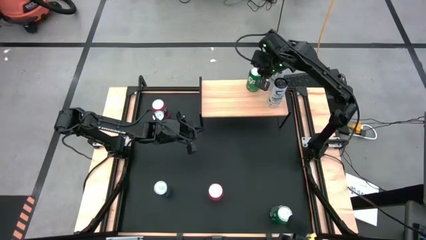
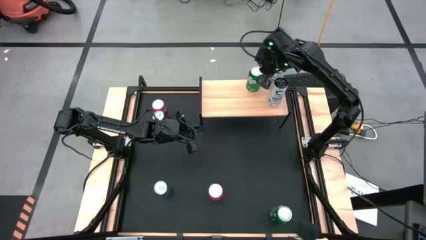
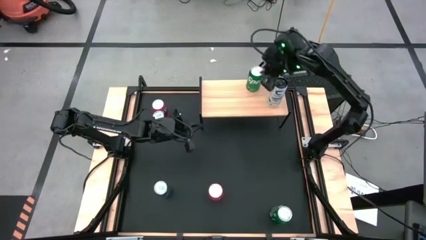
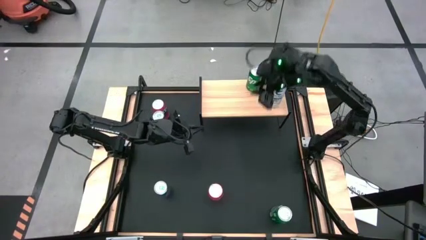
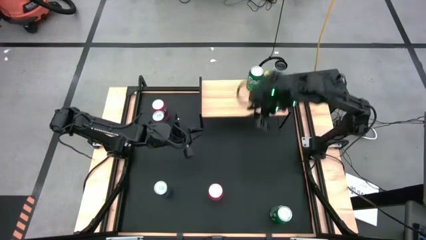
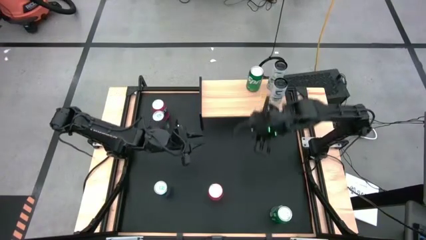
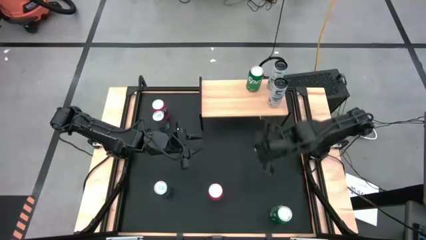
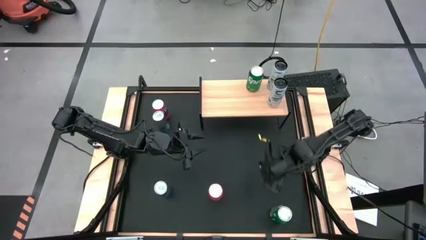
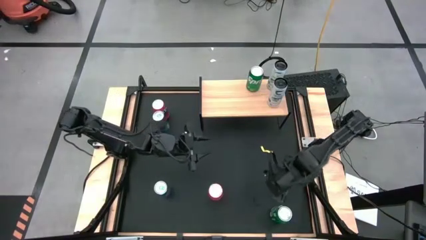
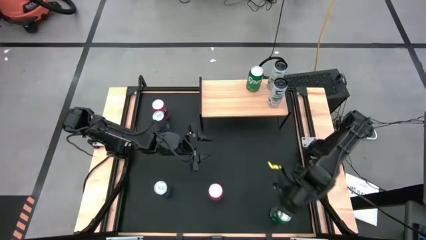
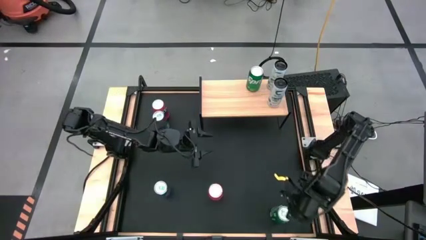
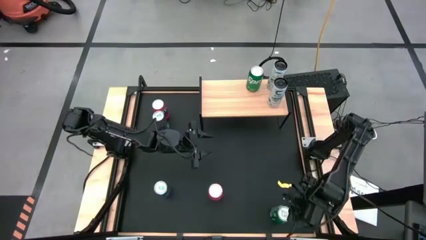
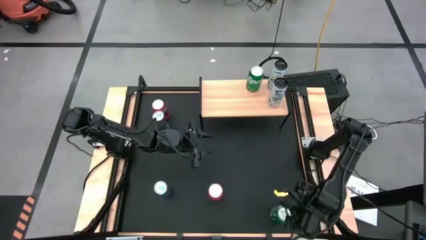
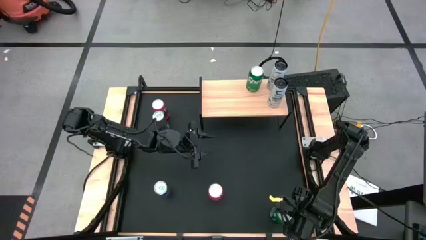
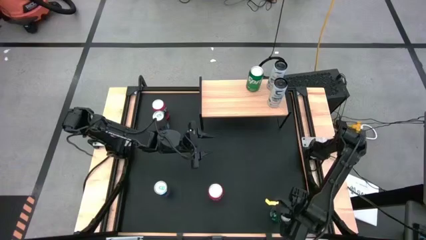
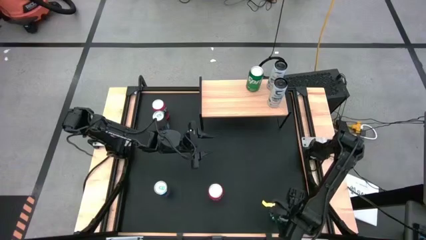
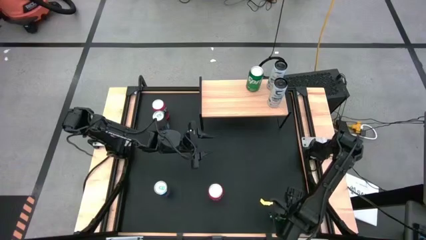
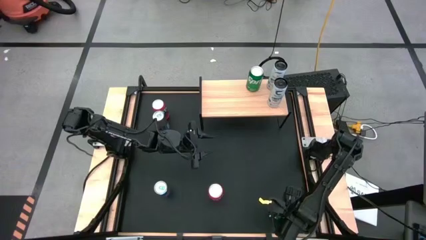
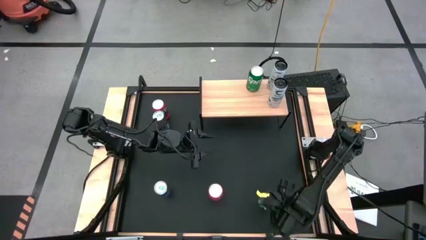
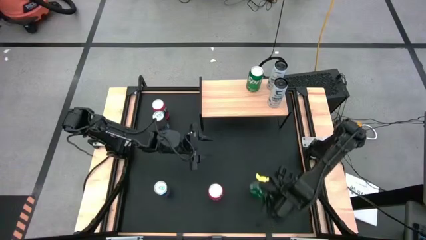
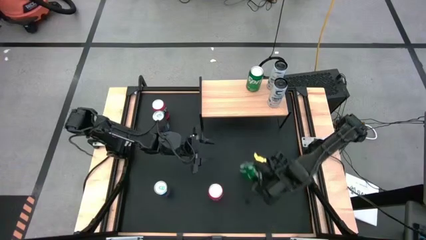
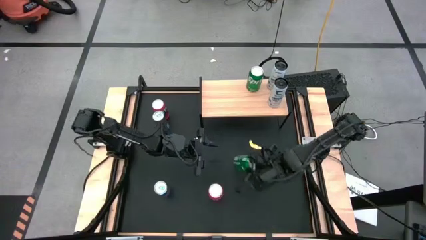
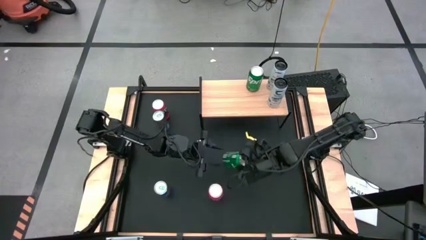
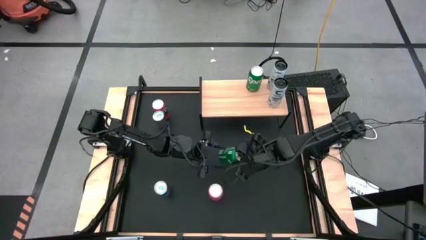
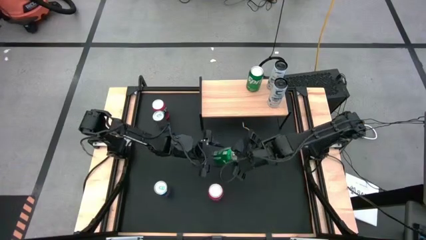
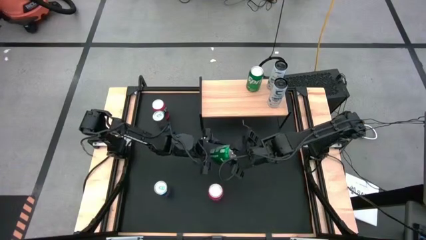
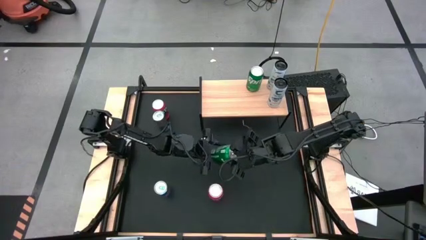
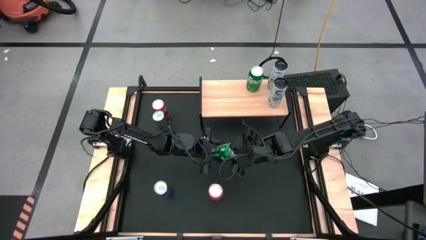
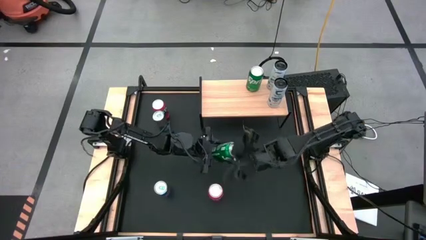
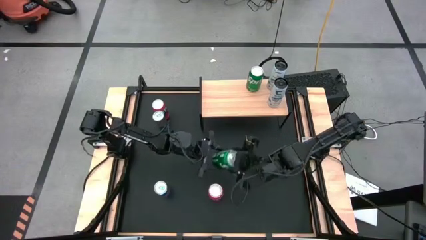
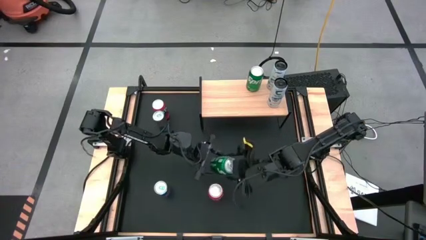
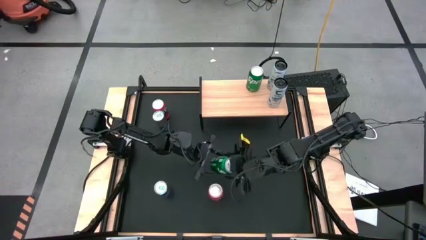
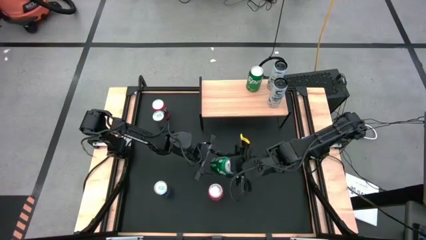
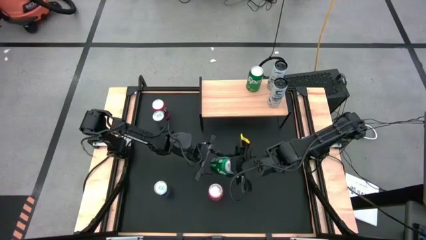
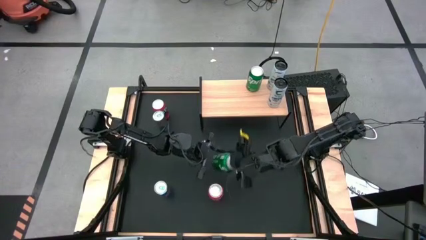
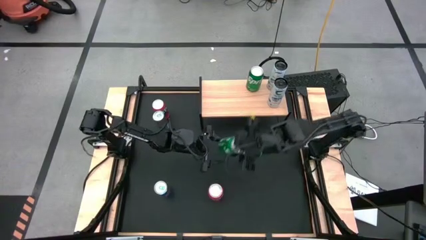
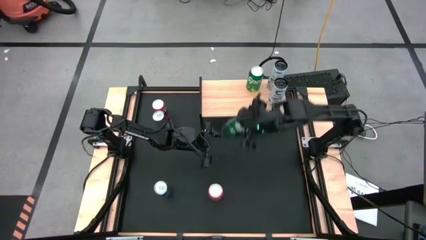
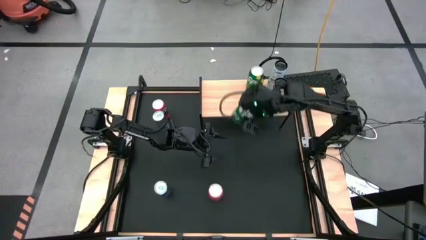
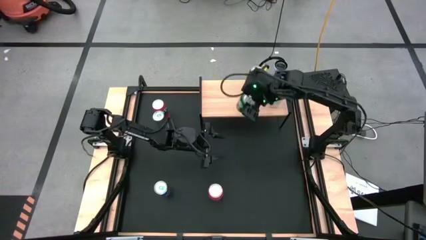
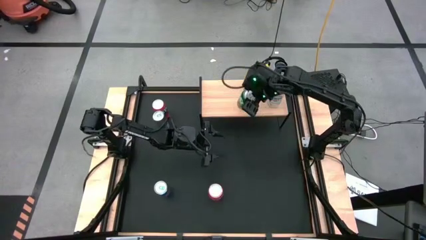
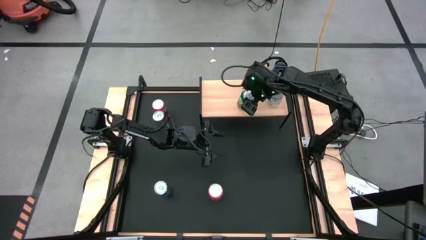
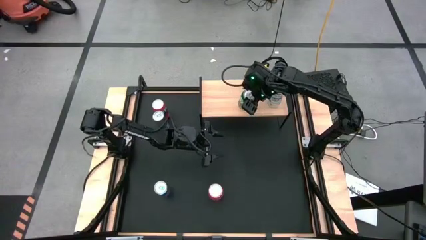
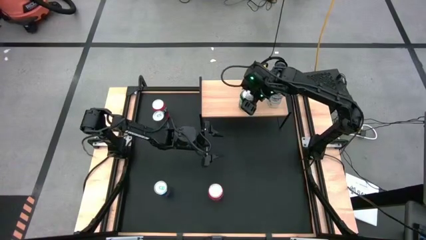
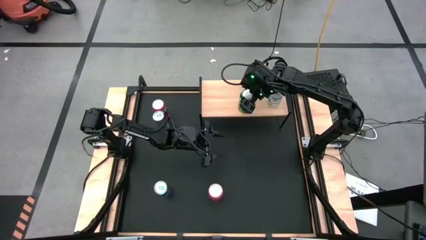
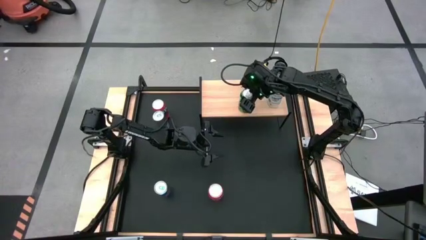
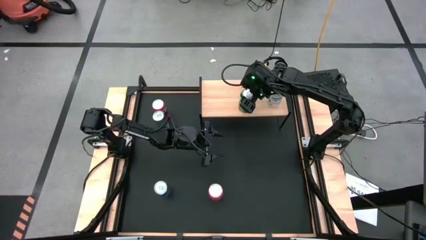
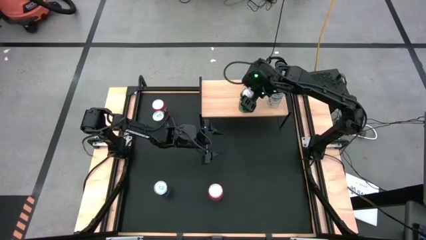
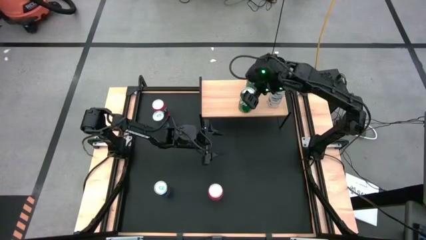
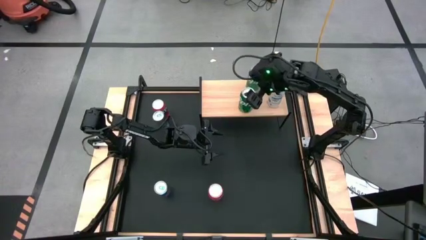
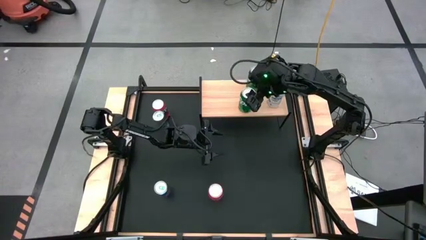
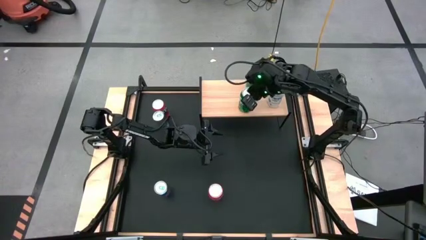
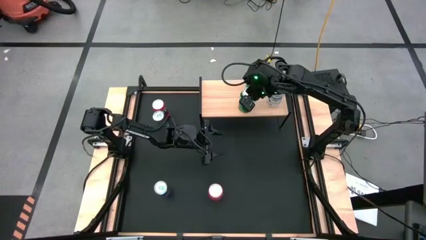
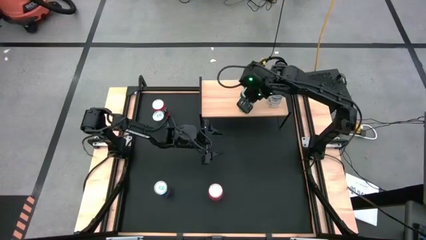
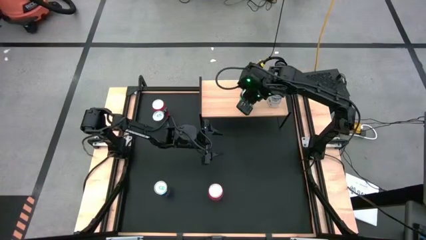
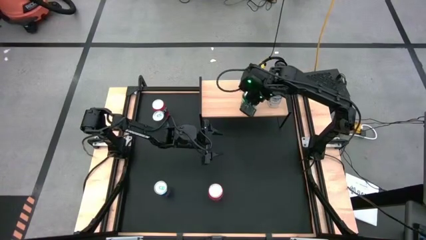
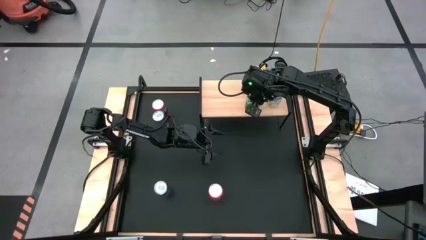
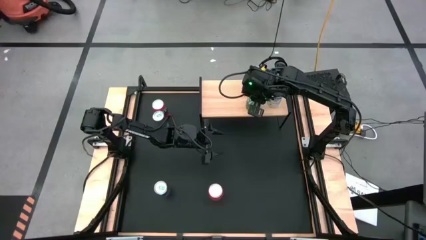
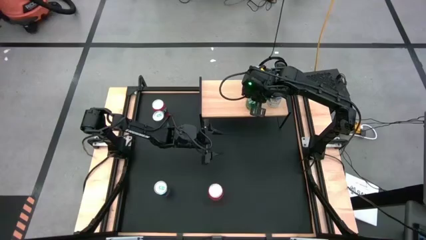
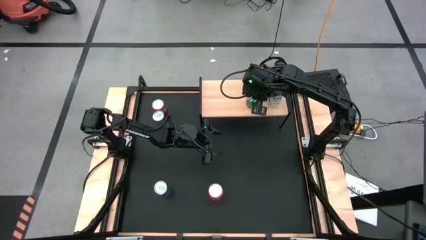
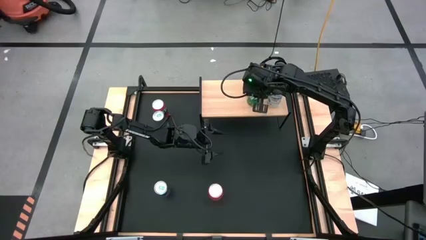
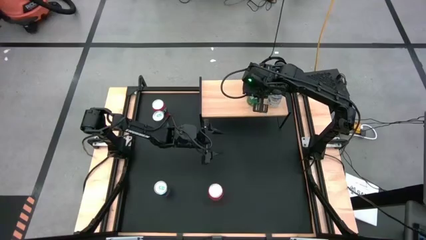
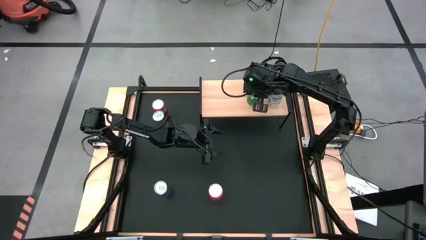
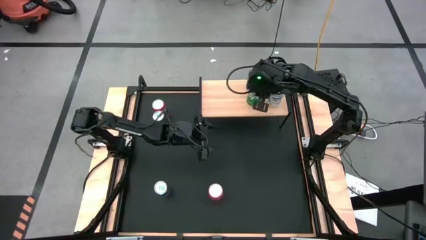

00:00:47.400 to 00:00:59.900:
Task: Place canned beverage on shelf
Put the green soda can on the shelf

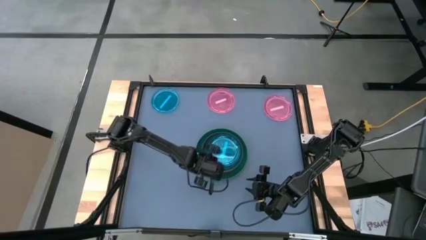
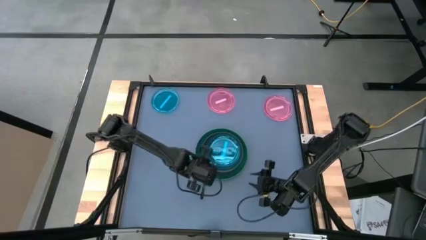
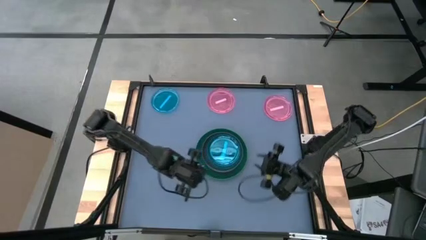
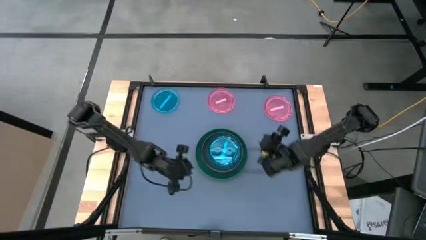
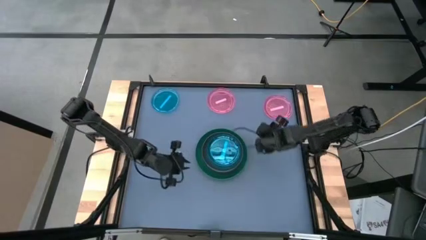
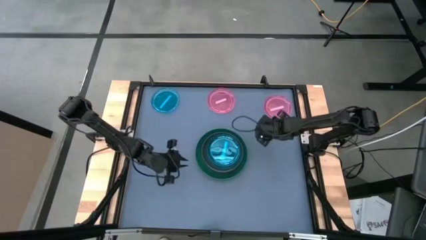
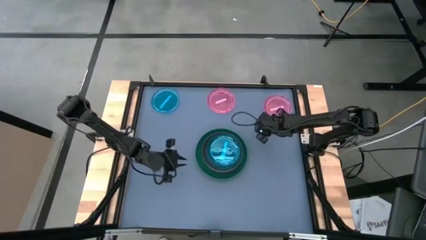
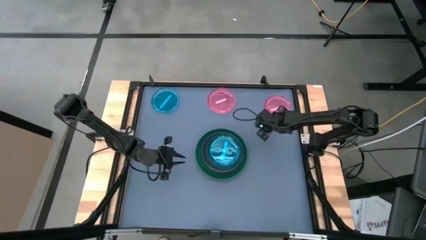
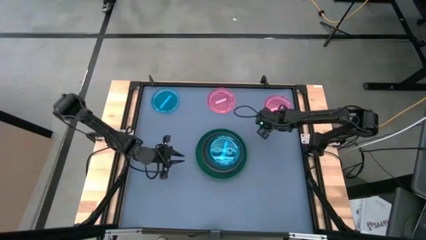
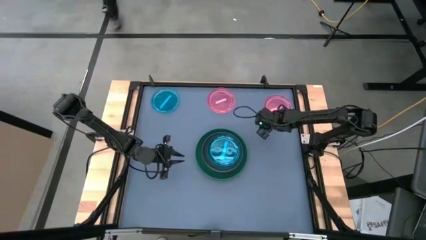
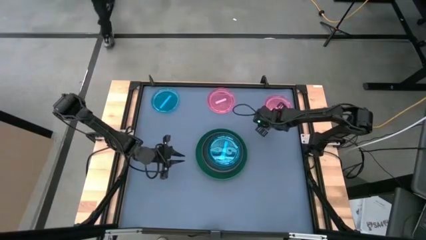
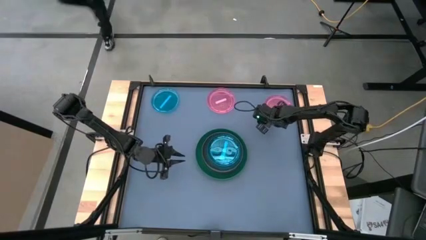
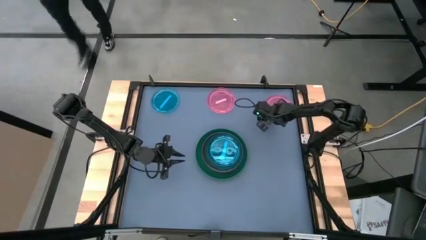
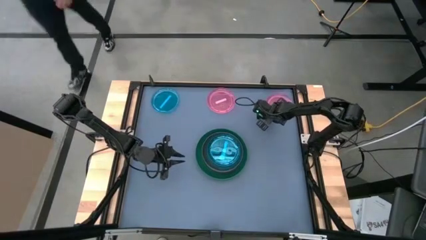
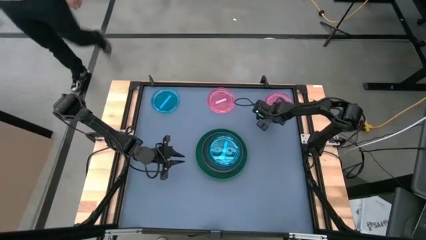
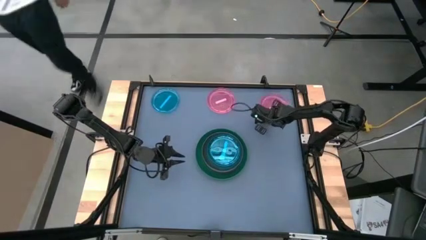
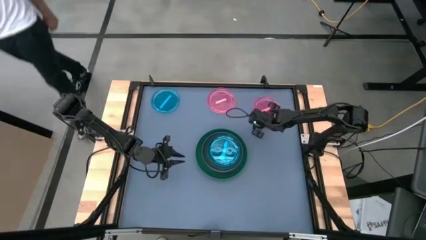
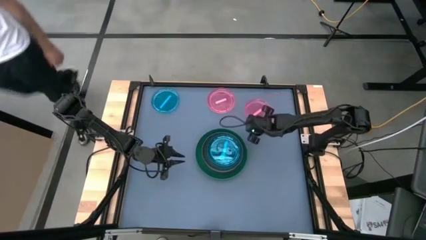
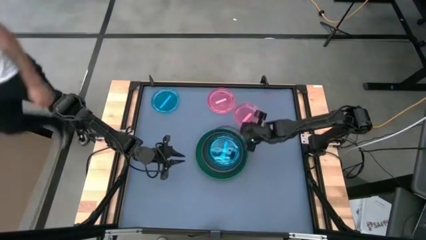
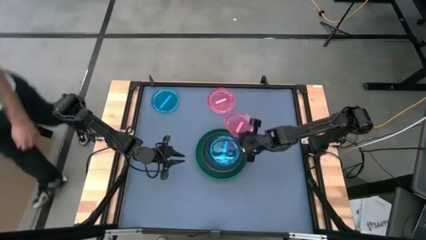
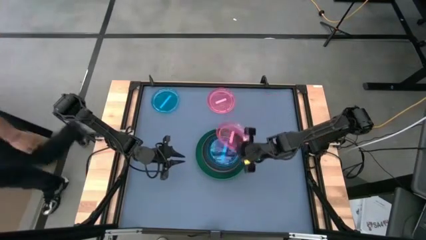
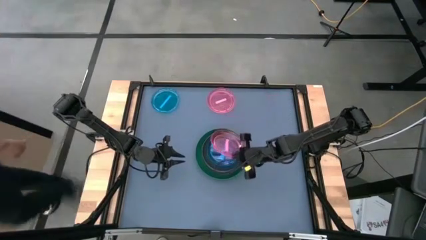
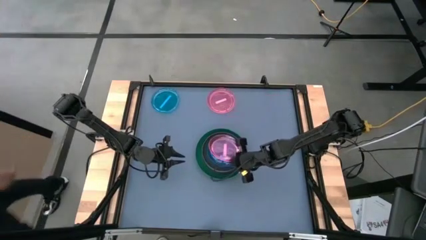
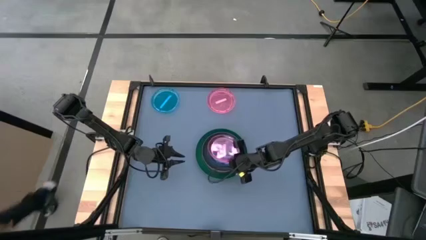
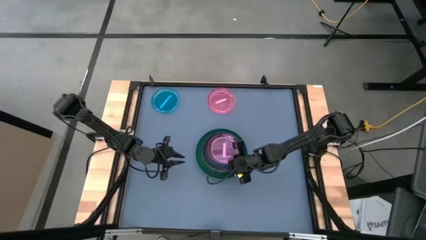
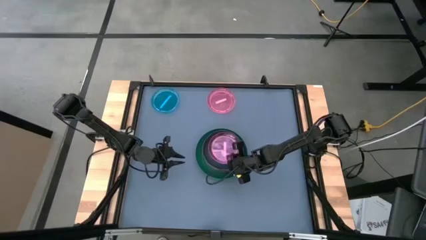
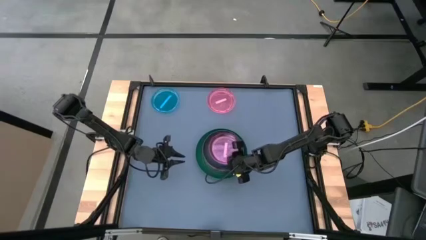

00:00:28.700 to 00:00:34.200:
Task: Stack plastic plates
Stack the right pink plate on top of the blue plate
